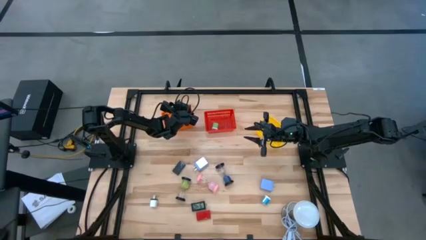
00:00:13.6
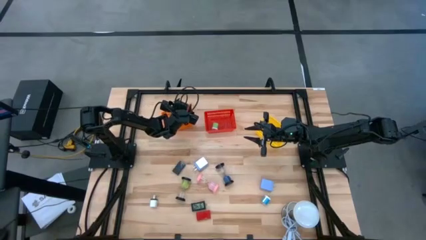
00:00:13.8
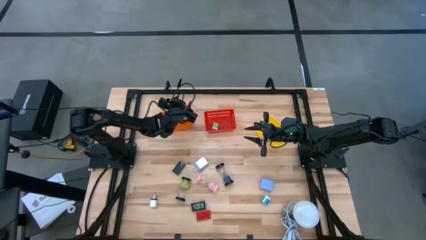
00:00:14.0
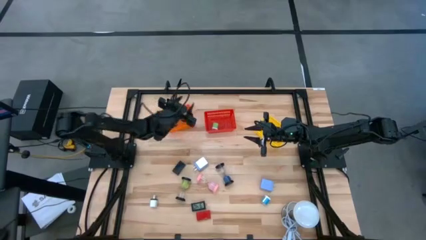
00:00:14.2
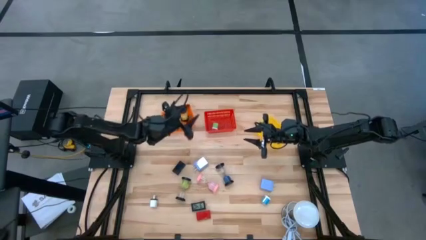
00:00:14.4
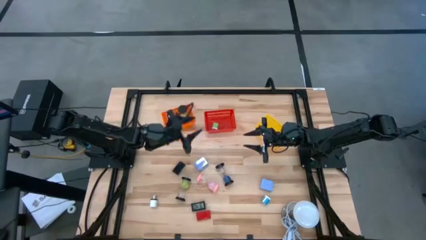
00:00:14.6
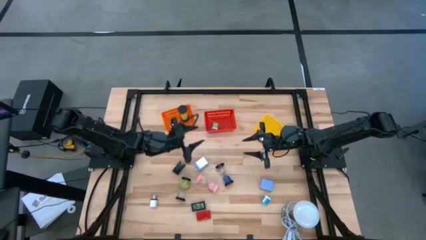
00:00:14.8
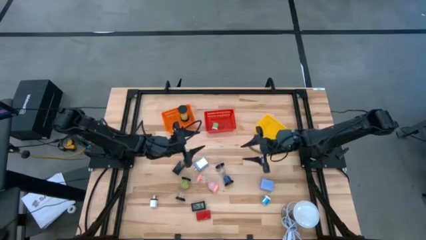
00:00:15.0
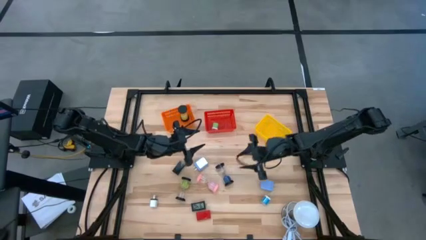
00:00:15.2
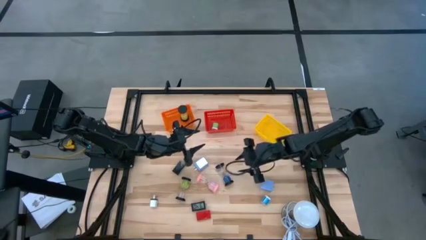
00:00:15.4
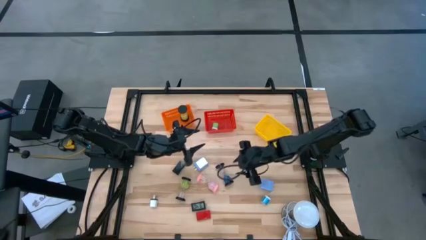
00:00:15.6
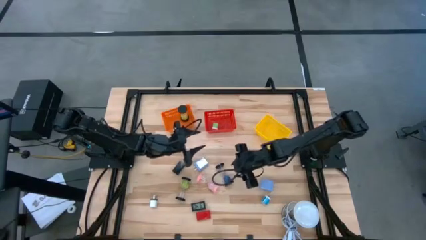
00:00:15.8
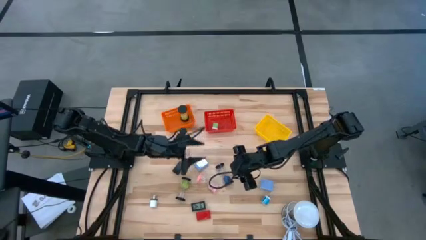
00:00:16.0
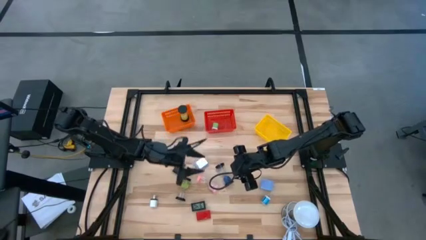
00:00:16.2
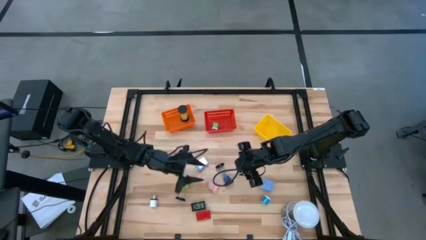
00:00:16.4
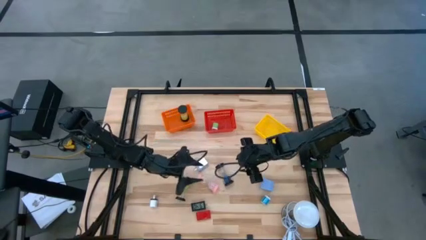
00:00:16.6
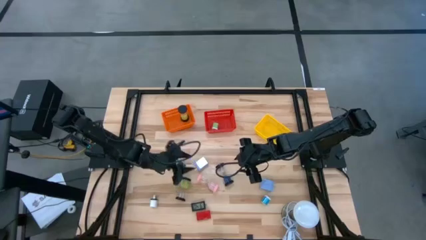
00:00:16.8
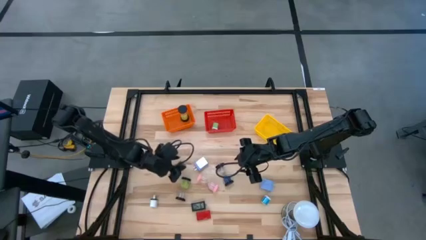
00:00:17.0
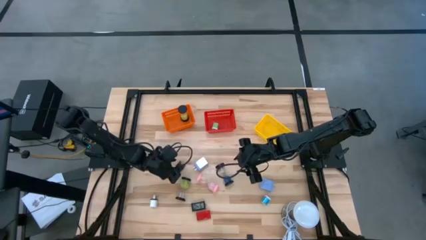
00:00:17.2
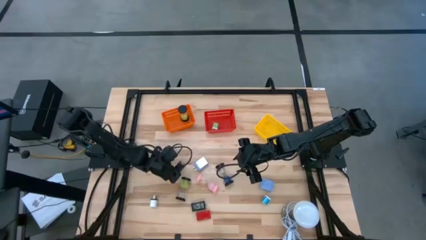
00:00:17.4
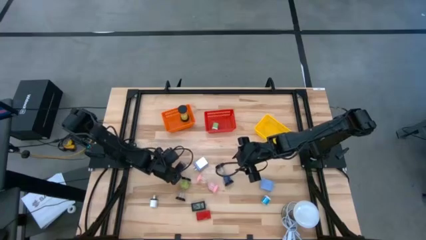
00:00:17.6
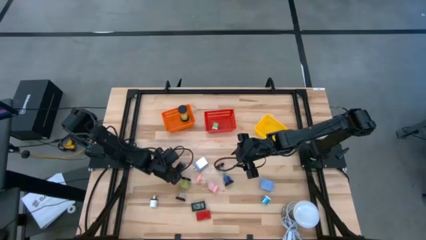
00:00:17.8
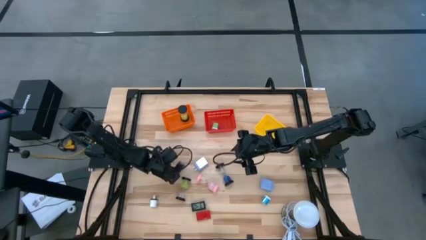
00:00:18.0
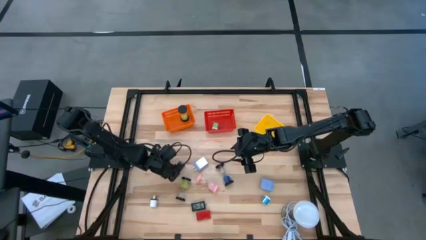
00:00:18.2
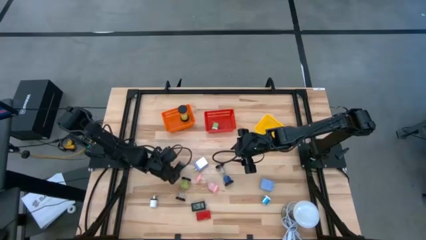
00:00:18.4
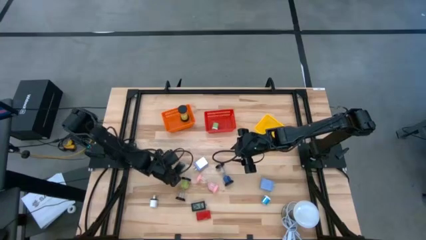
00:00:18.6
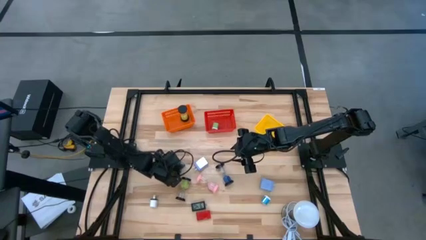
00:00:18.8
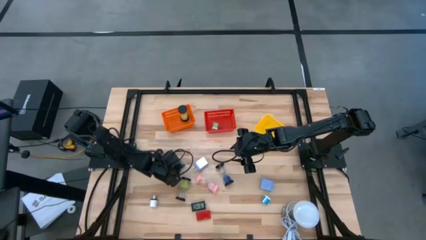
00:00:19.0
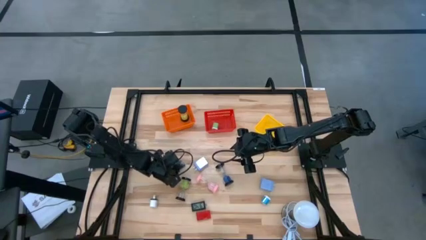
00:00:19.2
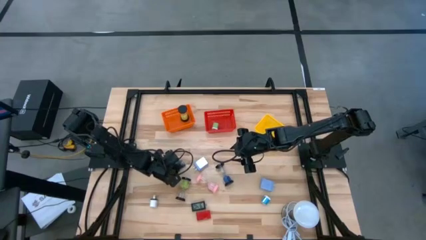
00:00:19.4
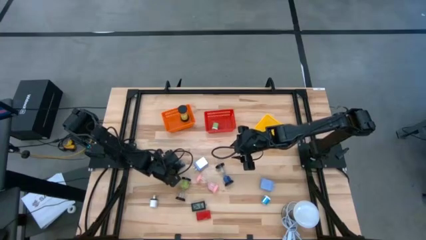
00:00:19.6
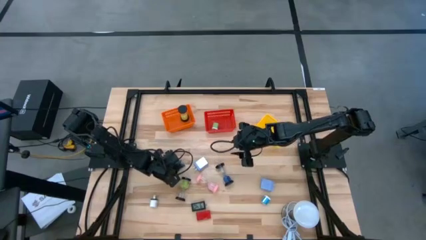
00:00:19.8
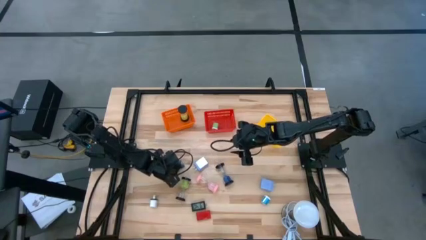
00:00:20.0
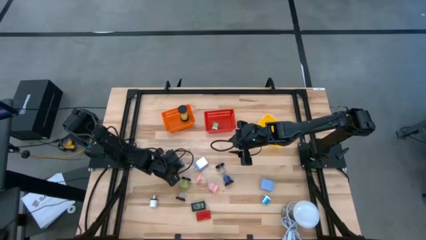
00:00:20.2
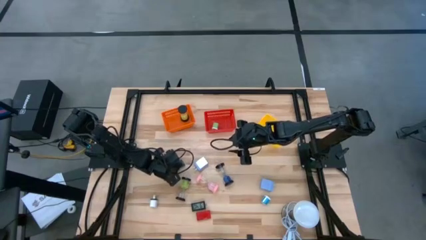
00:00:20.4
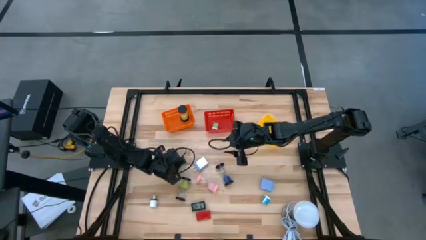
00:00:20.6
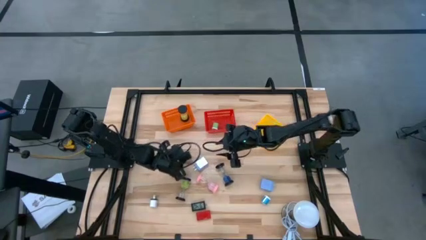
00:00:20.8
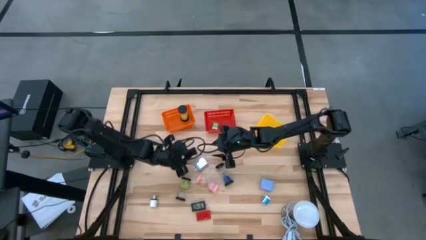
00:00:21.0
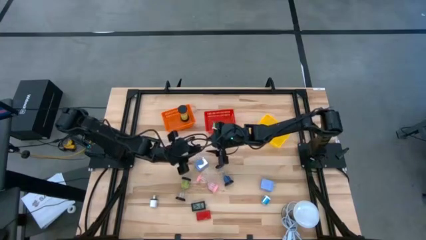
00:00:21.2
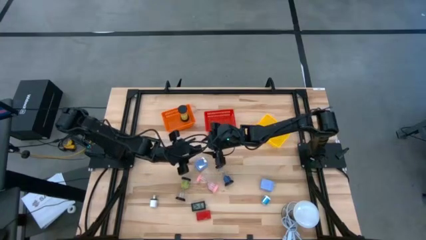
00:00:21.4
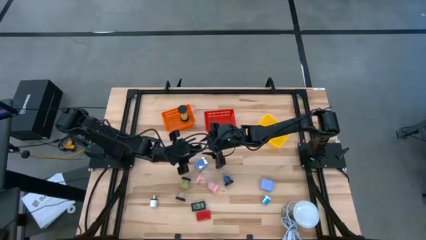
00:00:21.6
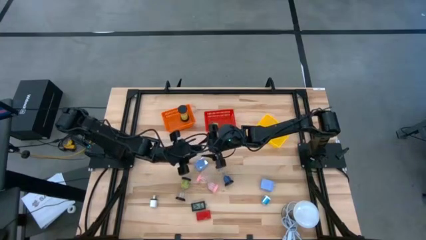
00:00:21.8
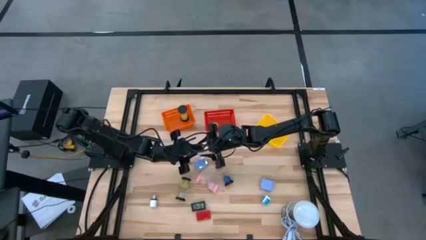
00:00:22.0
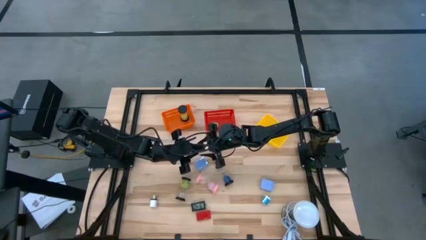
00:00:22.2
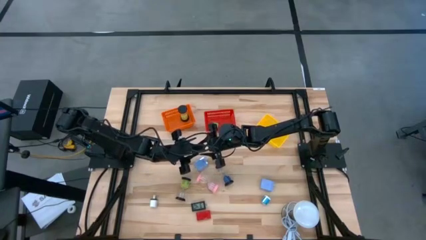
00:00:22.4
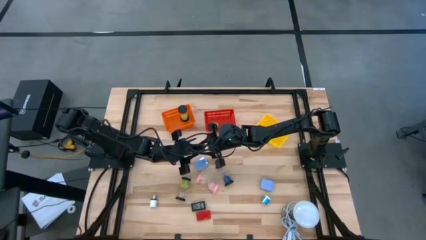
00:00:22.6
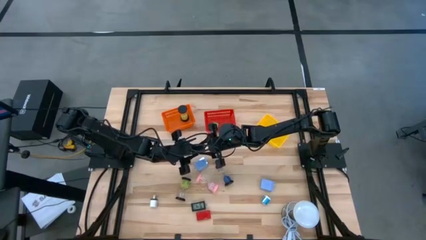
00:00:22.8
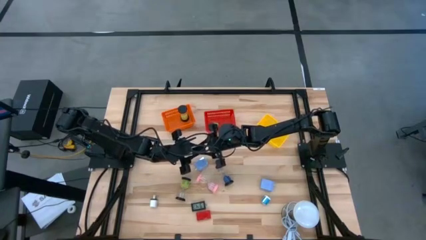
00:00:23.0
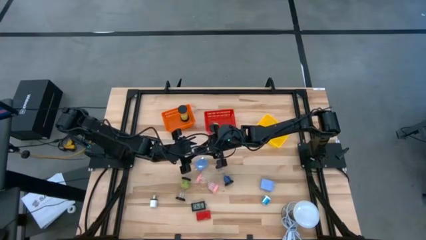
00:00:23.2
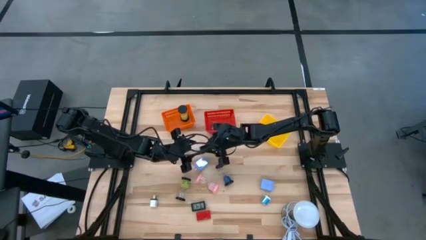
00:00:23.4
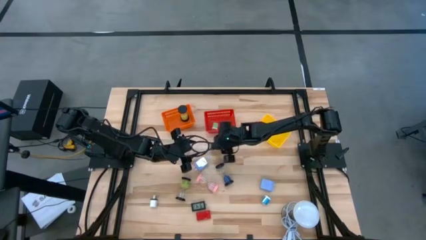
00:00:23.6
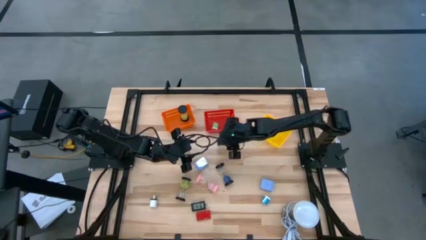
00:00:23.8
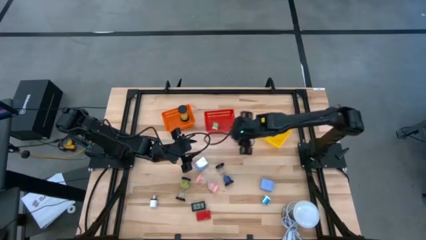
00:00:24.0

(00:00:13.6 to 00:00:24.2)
Task: Pick & Place Office items
Put the top black digital clock into the yellow bin

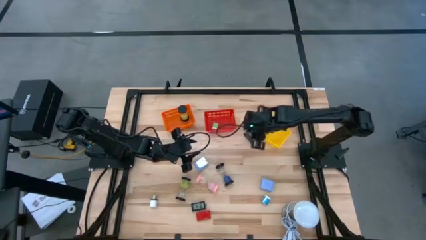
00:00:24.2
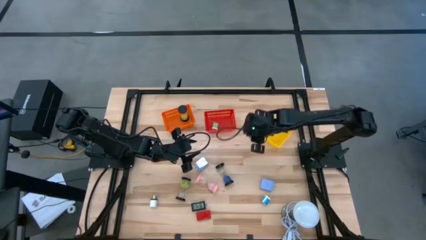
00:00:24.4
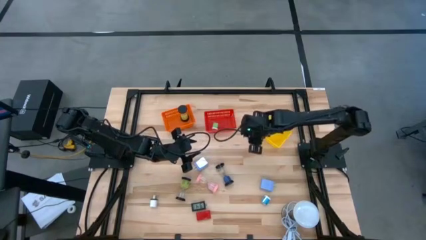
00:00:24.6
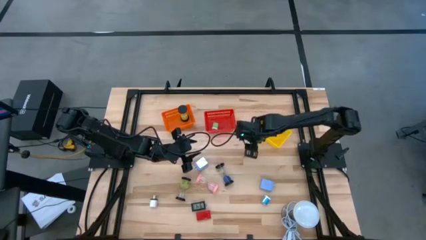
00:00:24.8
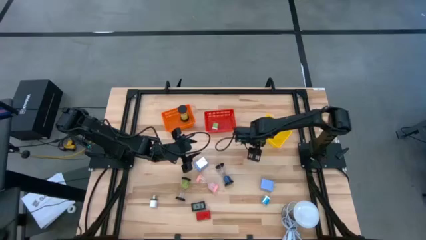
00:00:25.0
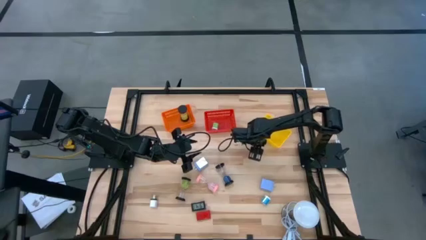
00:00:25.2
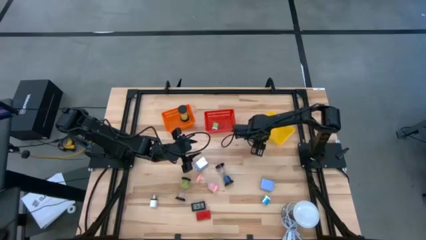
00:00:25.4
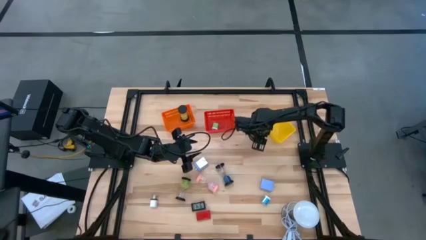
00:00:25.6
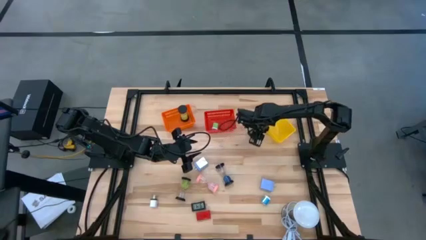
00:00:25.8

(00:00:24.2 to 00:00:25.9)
Adjust the yellow bin

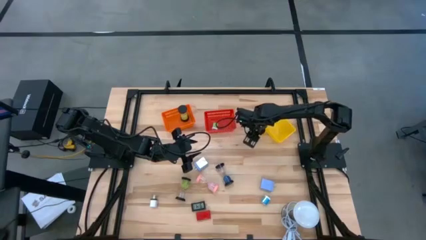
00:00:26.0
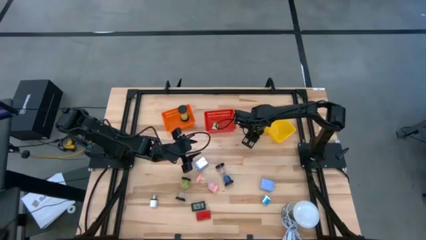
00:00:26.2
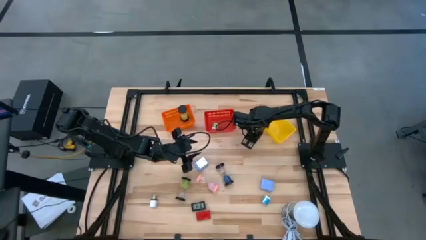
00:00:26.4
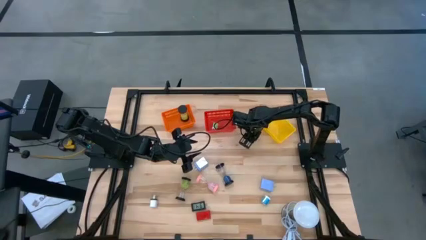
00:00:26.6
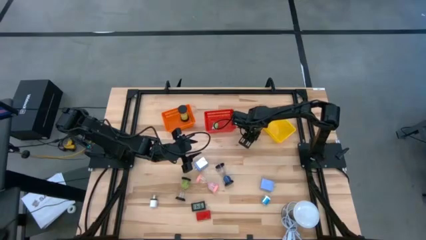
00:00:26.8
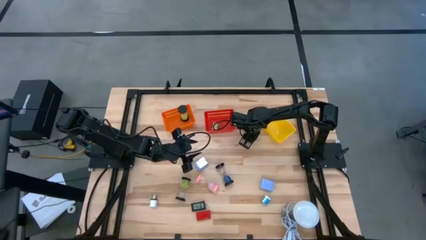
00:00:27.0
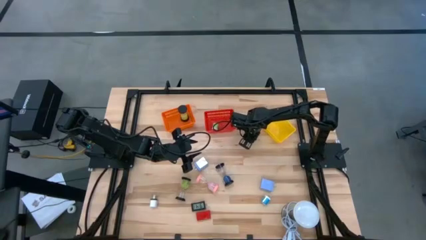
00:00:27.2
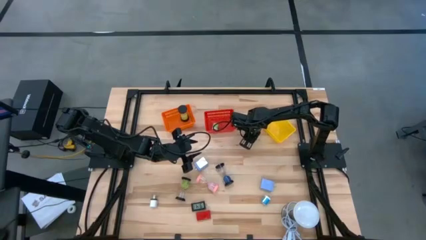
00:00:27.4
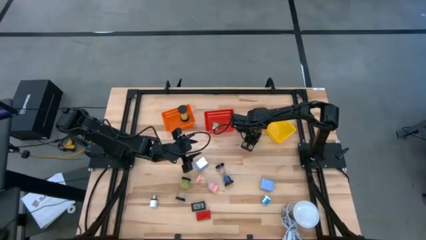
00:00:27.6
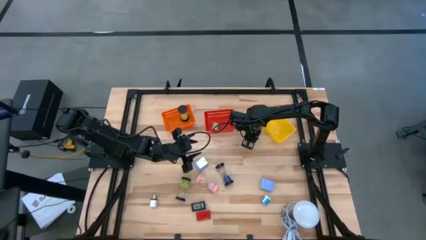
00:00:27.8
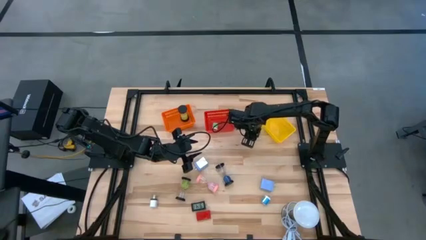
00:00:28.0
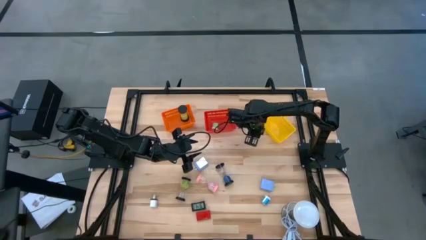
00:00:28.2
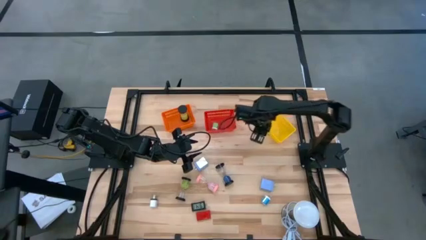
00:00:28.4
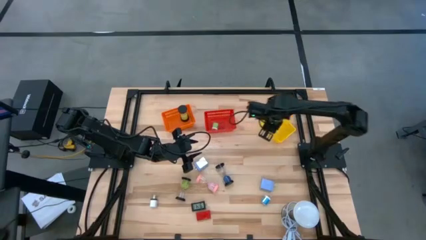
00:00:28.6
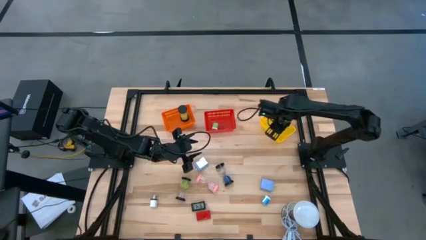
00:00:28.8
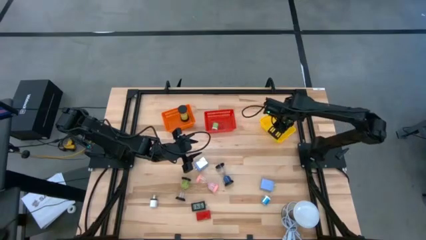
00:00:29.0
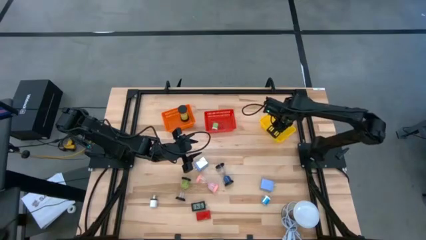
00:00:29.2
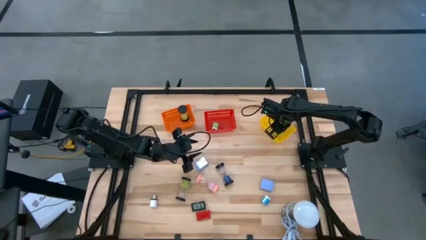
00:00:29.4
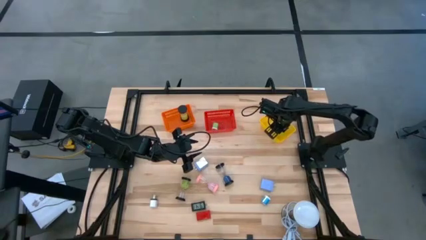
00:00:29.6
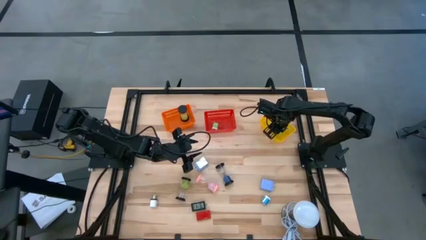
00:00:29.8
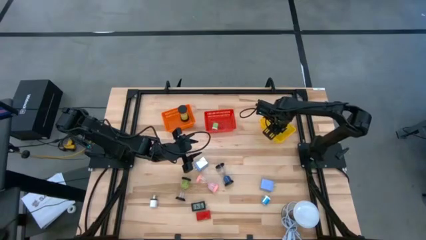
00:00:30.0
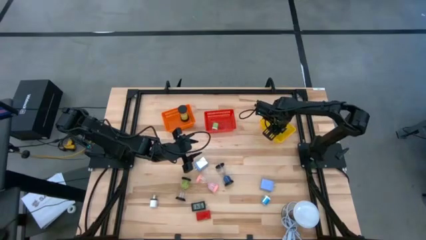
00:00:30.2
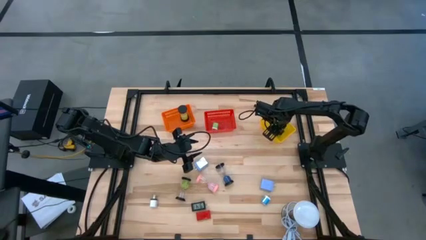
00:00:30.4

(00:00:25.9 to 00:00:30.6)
Put the top black digital clock into the yellow bin
